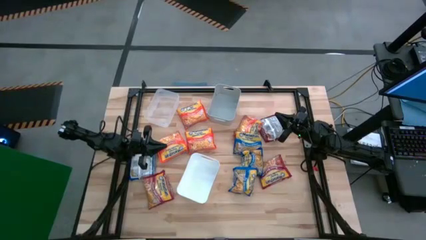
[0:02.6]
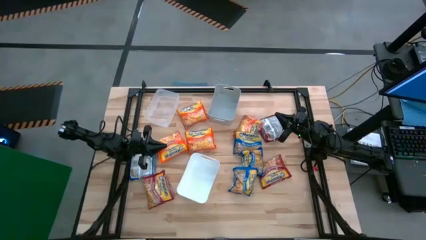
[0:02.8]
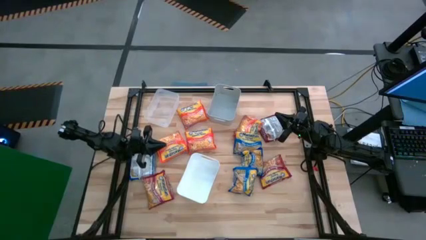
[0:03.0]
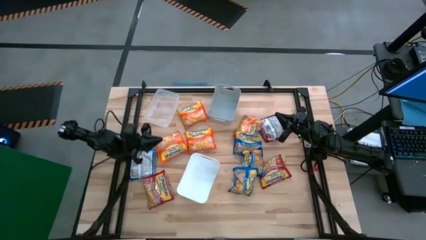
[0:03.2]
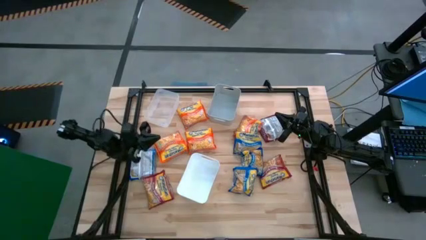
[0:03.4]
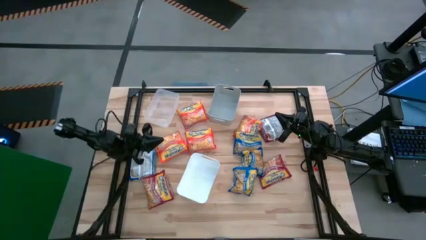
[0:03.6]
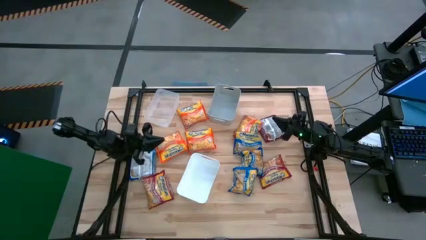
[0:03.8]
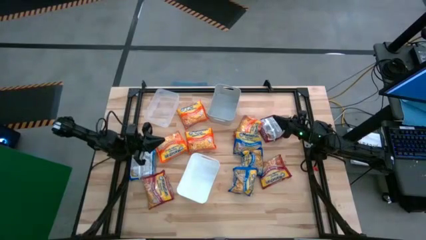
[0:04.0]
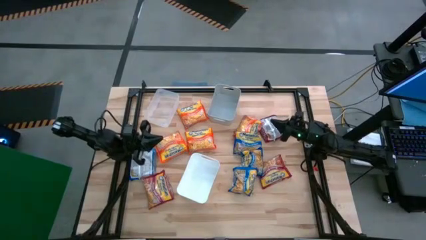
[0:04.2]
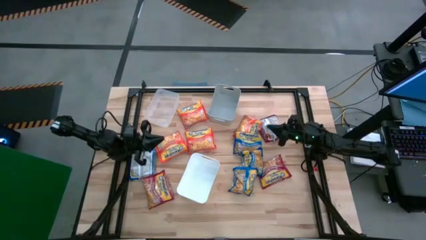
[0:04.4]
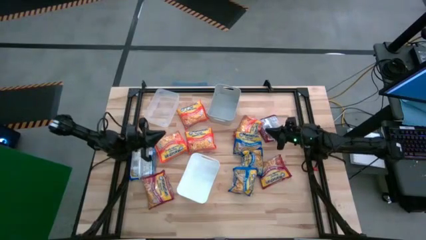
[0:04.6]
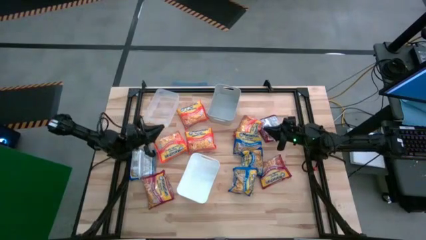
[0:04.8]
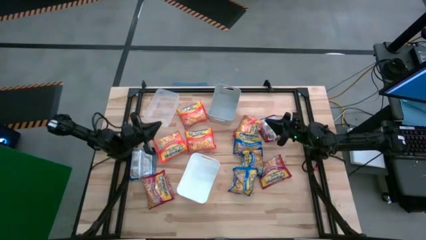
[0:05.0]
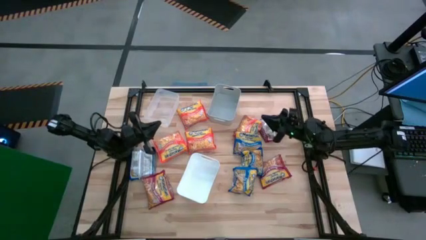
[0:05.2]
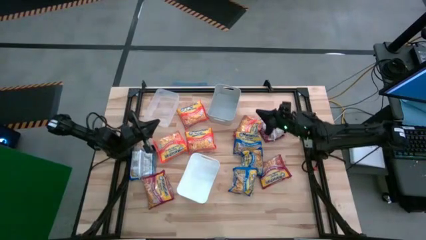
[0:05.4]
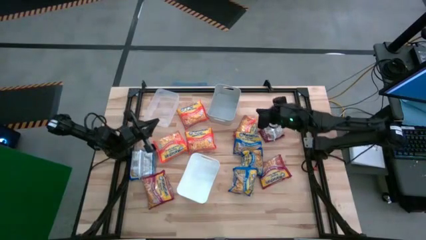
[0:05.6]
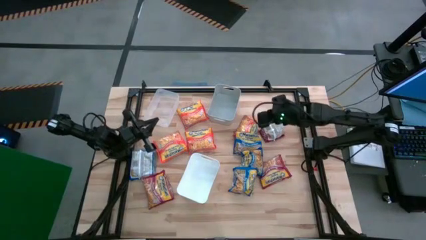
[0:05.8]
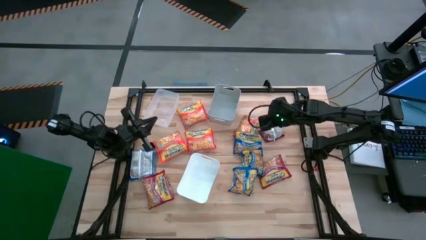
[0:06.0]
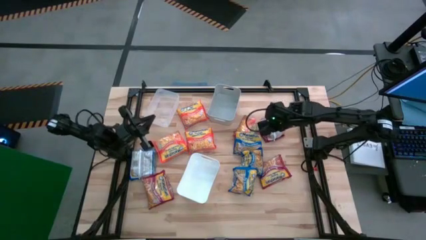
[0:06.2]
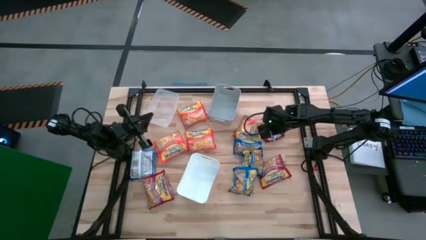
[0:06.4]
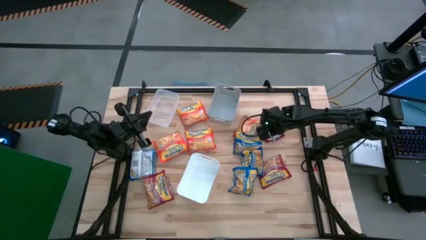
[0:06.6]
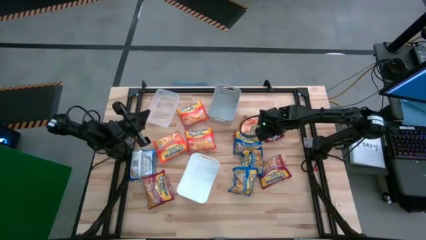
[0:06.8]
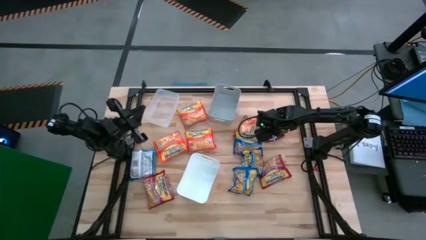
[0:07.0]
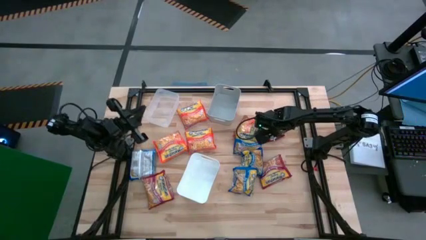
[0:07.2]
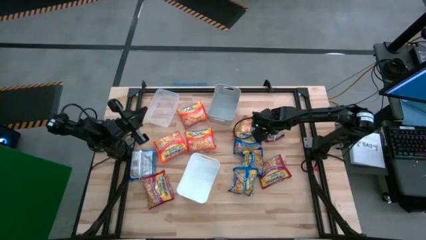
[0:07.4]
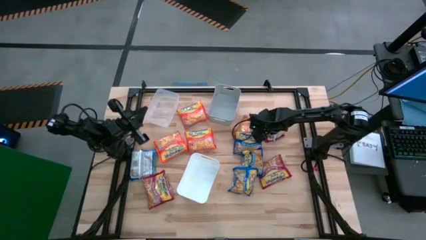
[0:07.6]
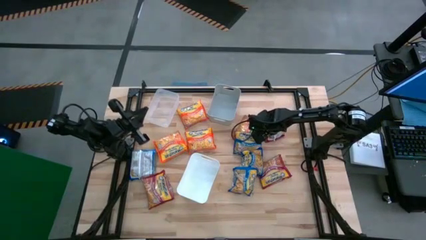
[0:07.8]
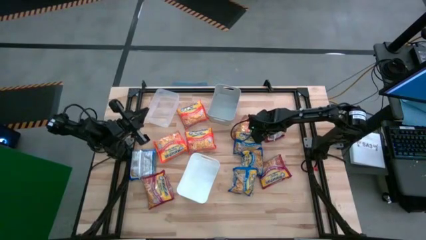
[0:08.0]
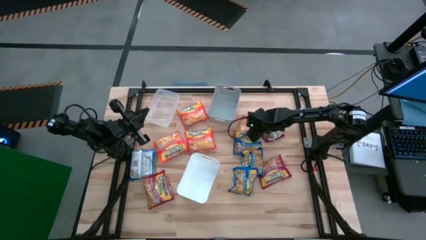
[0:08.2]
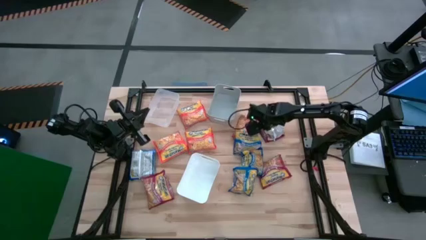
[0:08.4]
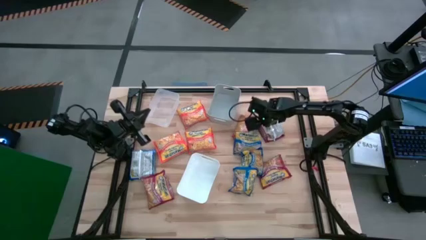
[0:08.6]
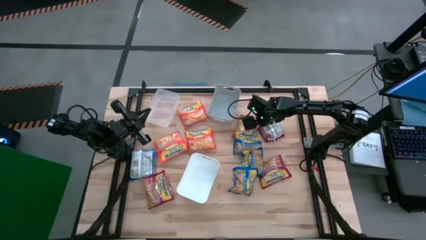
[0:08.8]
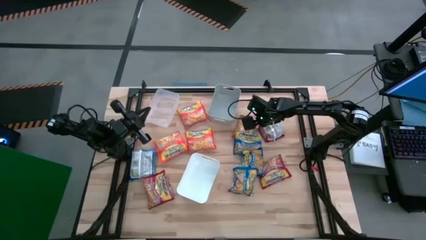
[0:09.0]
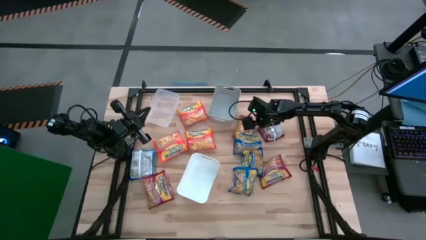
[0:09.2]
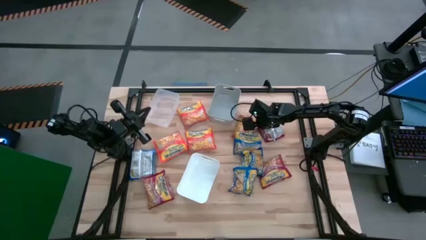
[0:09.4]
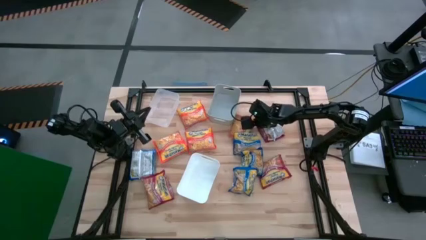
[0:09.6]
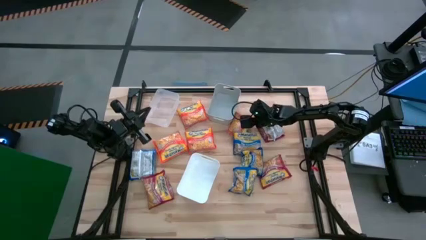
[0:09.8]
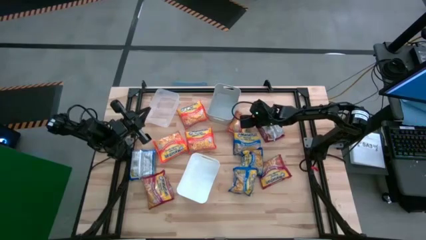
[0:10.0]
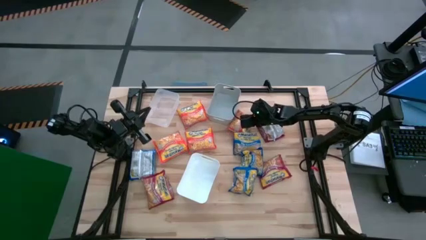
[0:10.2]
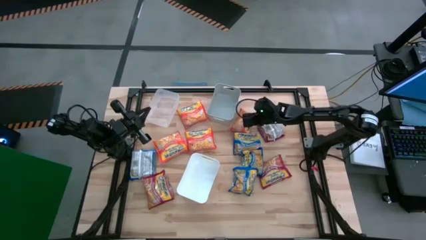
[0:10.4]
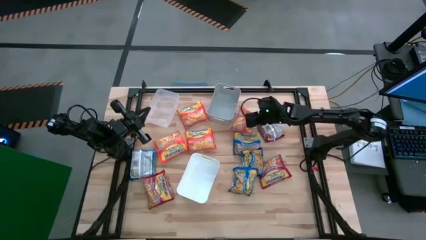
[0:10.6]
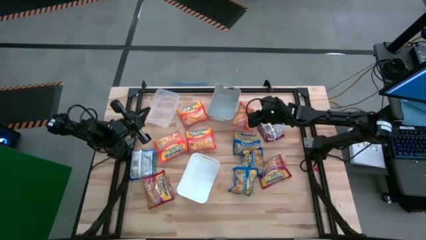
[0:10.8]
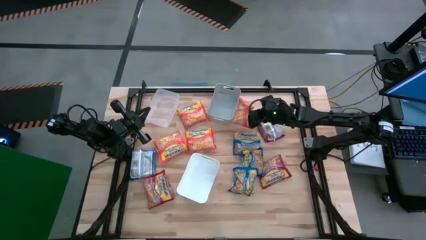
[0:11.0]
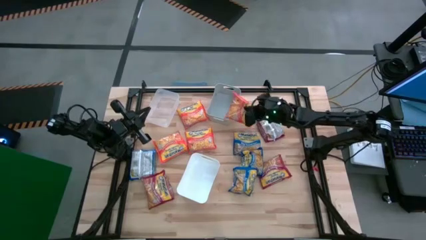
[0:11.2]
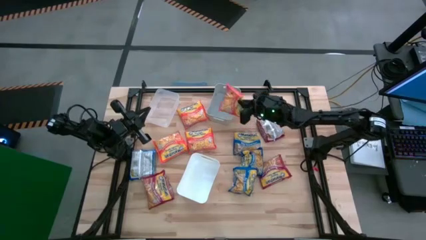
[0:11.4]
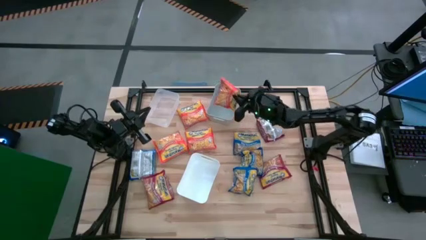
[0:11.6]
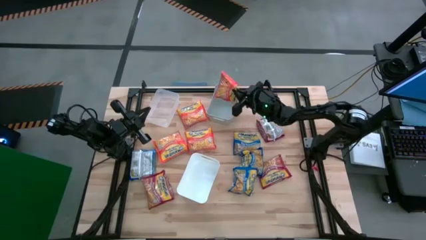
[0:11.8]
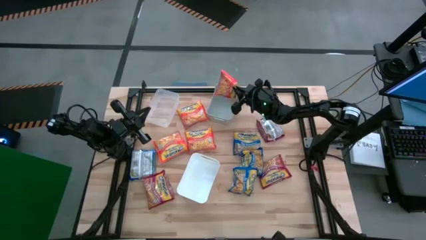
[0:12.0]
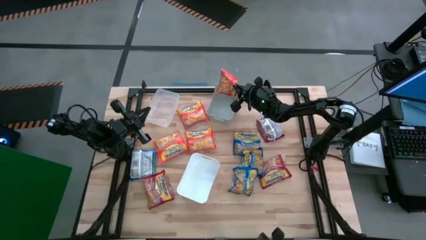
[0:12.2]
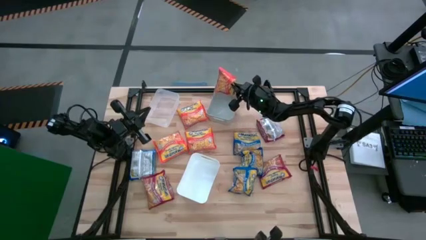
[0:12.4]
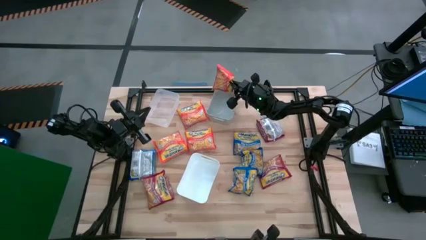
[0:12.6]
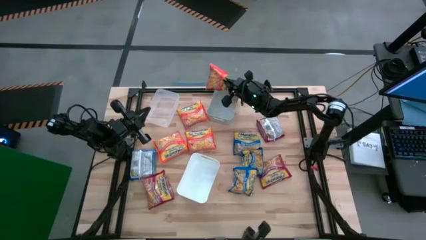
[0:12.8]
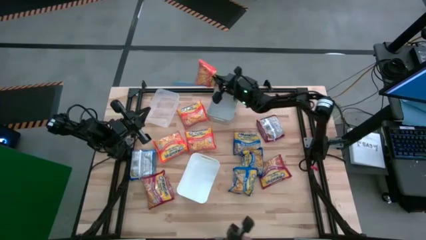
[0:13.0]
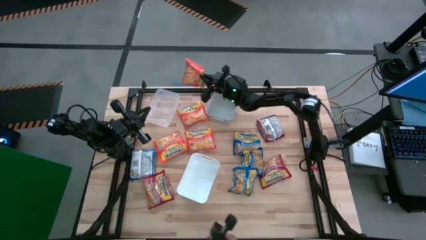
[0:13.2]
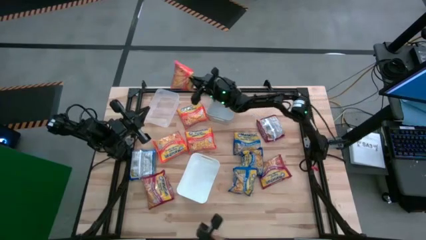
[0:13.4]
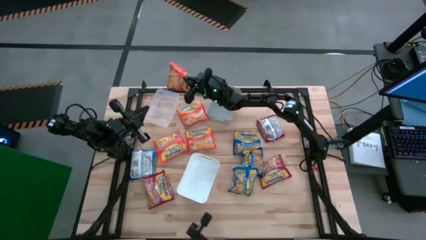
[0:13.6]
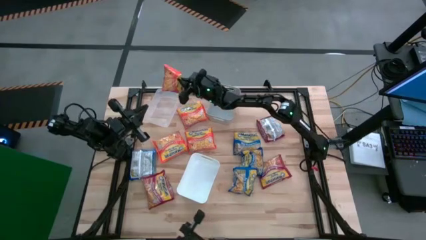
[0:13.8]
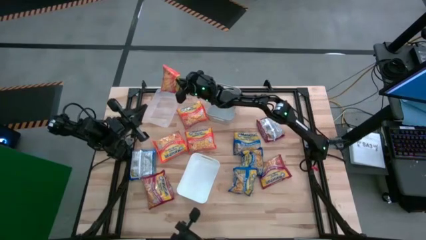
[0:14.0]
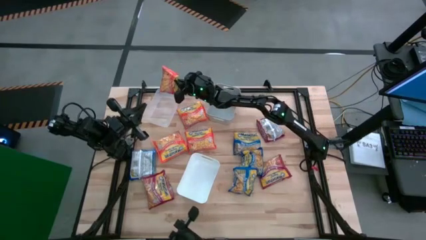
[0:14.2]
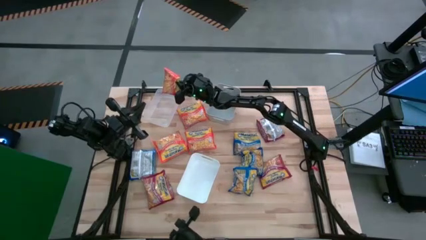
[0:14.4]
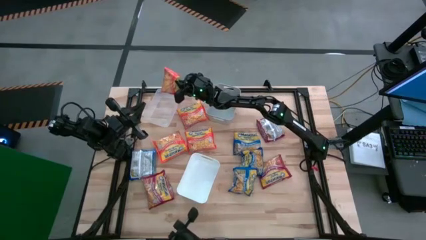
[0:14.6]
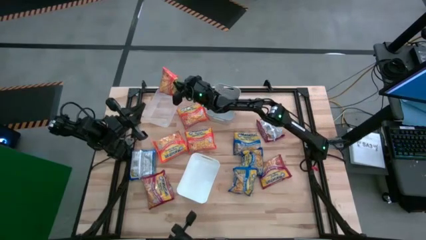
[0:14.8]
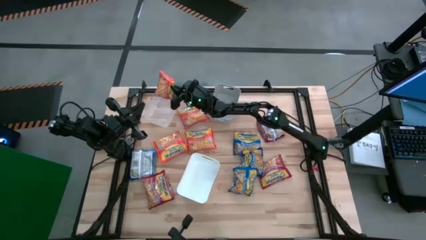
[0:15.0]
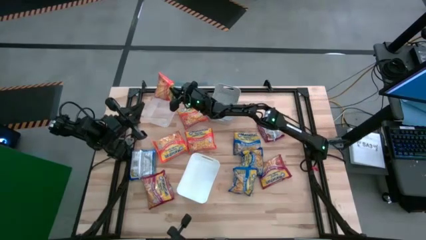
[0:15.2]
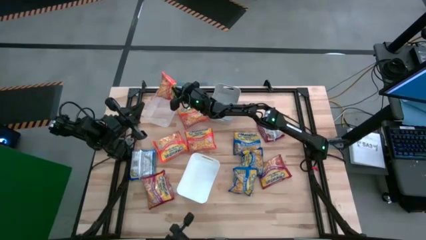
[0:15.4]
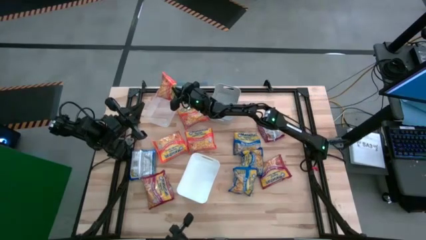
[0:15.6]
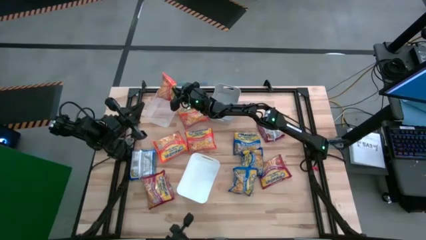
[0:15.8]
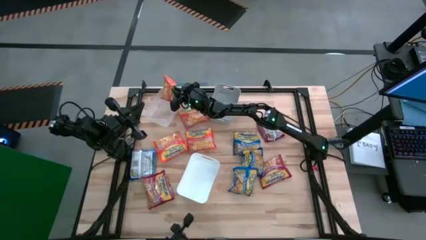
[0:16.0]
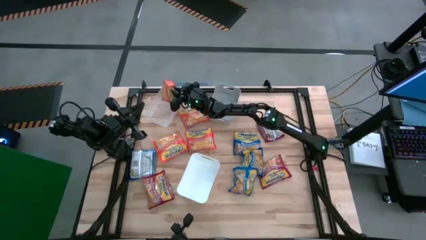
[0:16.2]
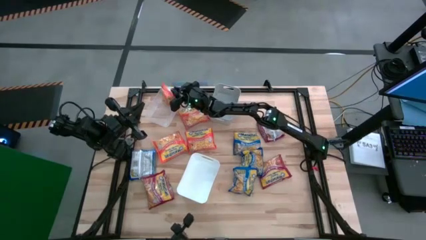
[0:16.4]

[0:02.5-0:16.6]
Task: Sort Maruchan noodles
Put the orange noodle pack into the transparent bin
